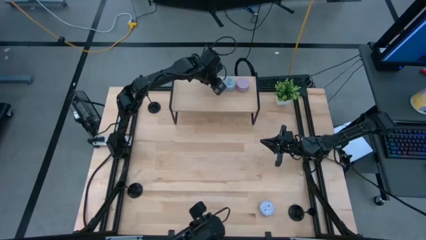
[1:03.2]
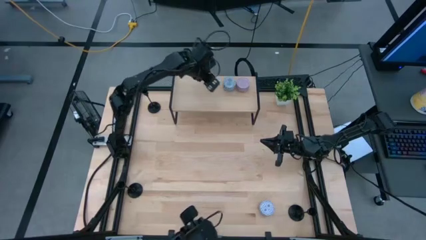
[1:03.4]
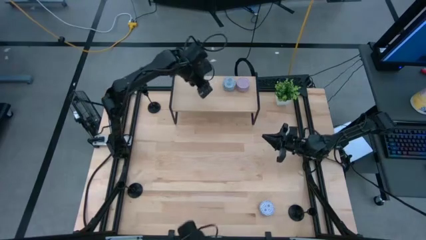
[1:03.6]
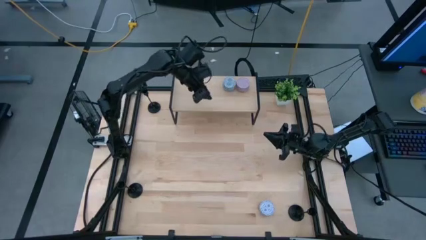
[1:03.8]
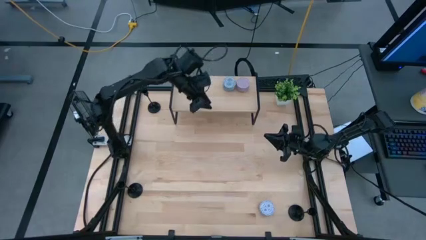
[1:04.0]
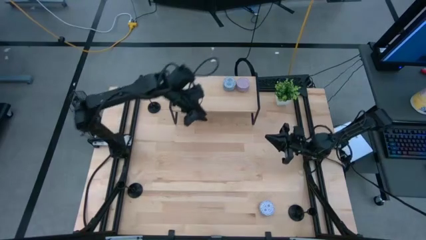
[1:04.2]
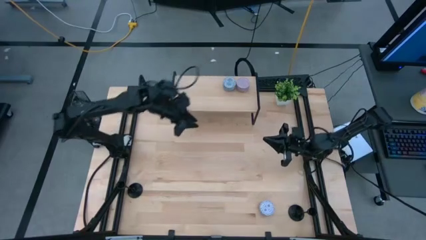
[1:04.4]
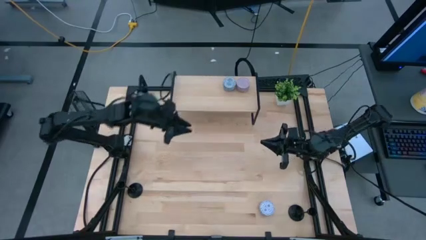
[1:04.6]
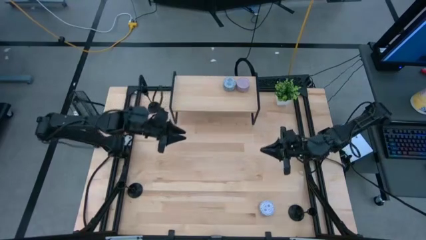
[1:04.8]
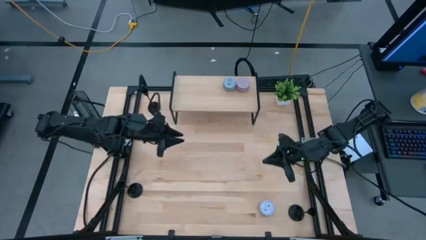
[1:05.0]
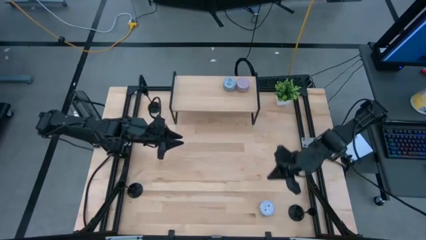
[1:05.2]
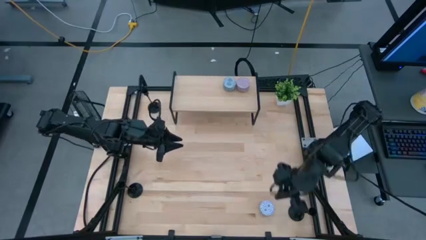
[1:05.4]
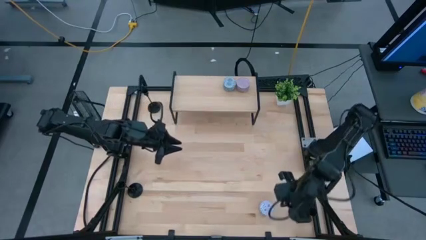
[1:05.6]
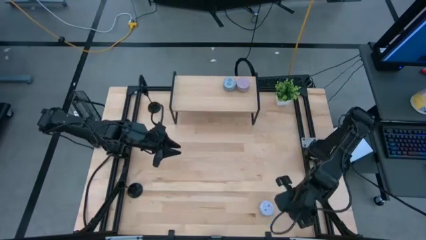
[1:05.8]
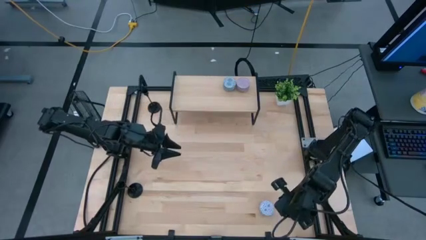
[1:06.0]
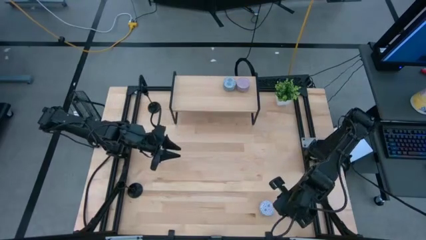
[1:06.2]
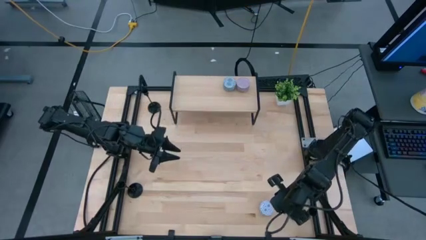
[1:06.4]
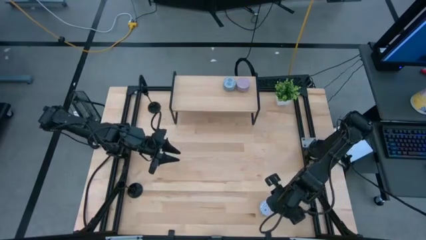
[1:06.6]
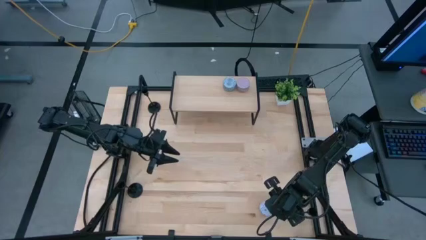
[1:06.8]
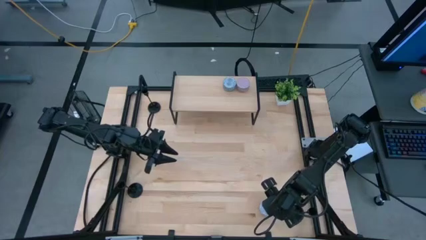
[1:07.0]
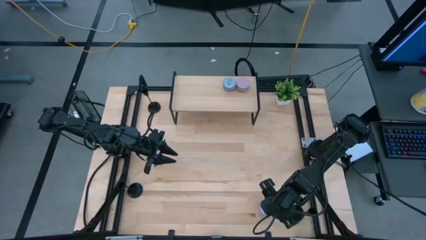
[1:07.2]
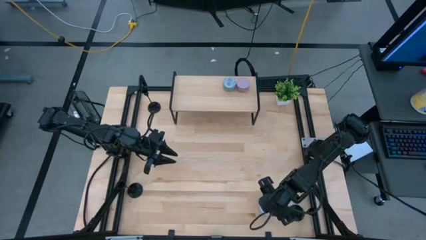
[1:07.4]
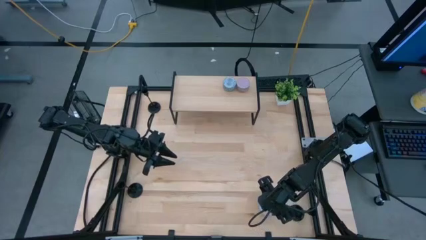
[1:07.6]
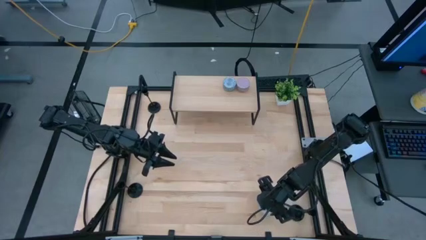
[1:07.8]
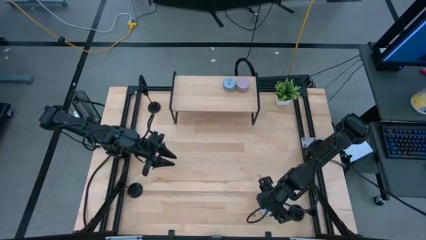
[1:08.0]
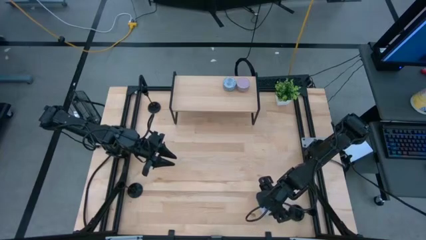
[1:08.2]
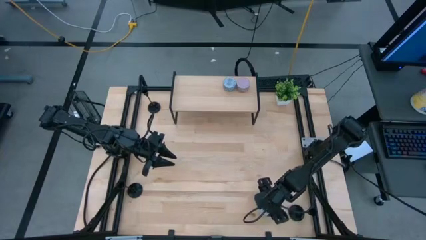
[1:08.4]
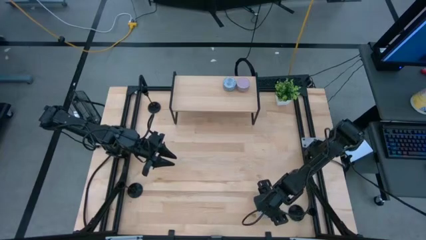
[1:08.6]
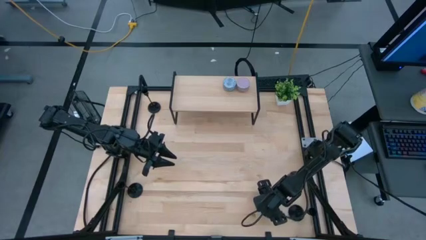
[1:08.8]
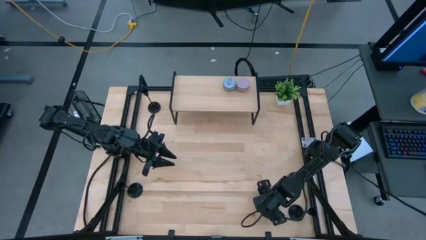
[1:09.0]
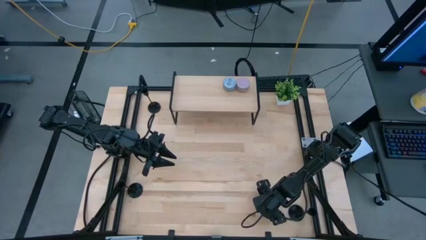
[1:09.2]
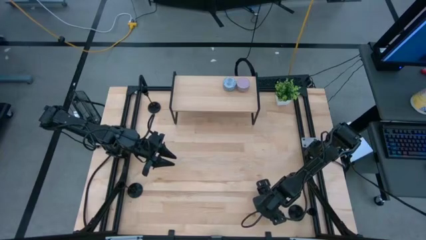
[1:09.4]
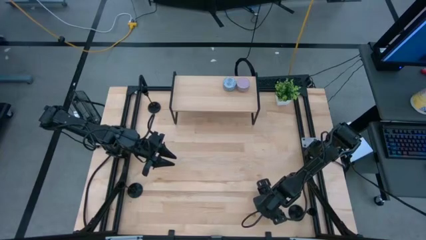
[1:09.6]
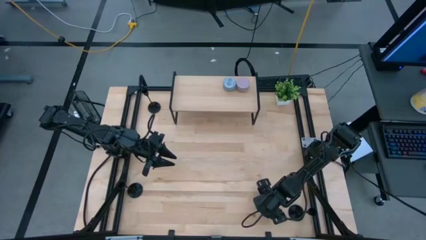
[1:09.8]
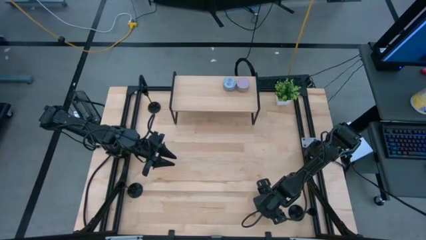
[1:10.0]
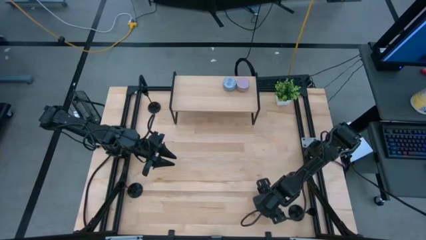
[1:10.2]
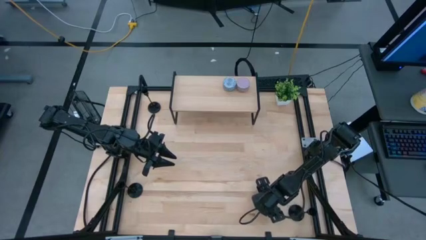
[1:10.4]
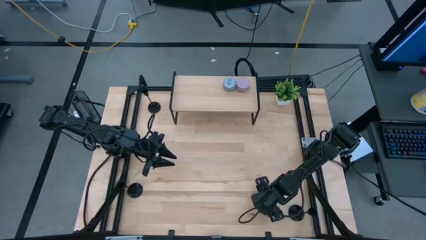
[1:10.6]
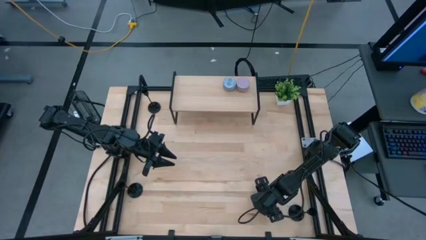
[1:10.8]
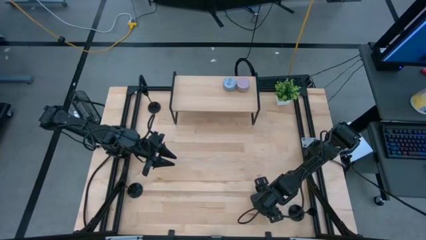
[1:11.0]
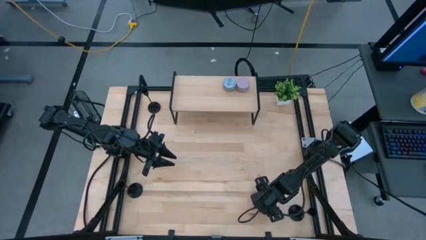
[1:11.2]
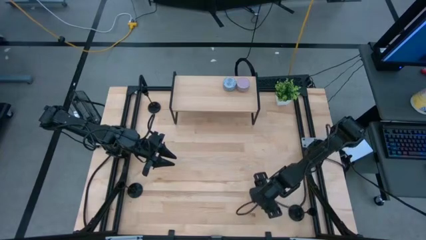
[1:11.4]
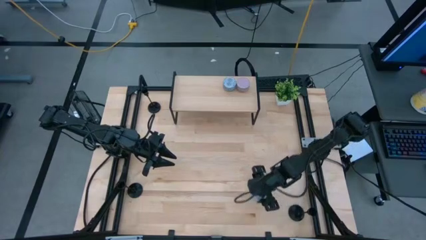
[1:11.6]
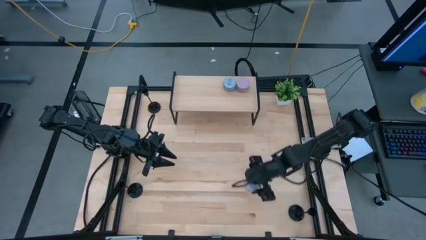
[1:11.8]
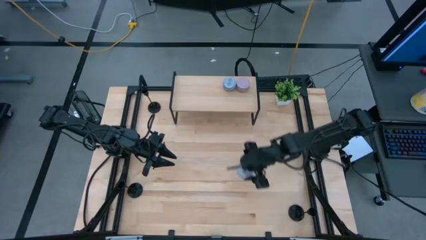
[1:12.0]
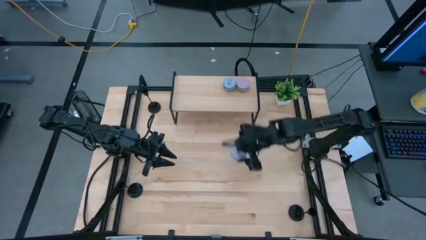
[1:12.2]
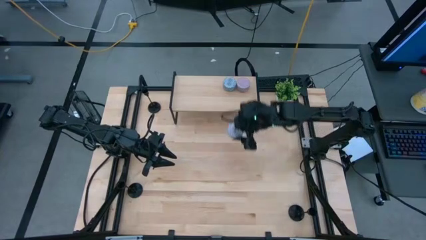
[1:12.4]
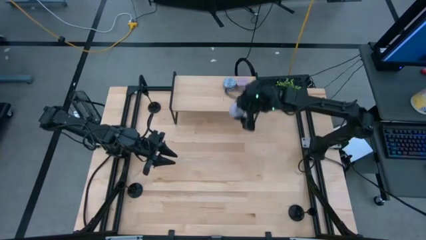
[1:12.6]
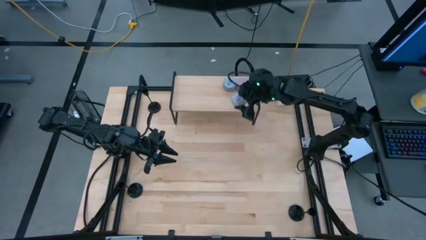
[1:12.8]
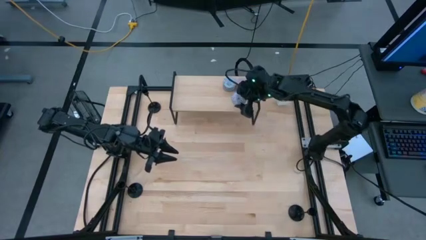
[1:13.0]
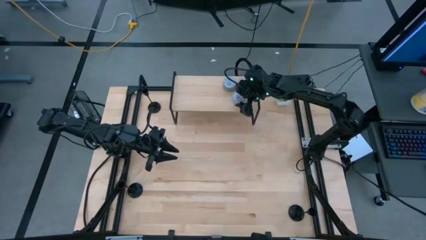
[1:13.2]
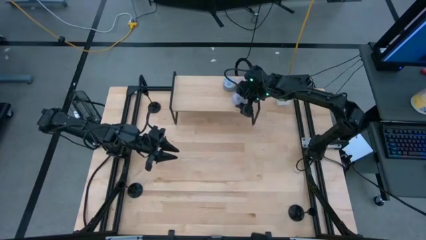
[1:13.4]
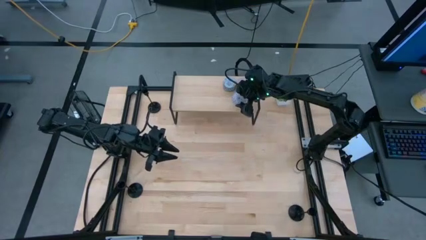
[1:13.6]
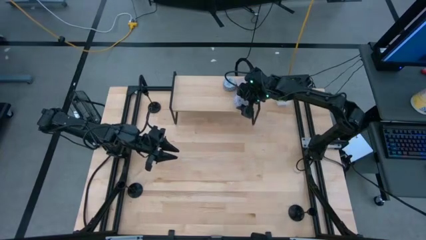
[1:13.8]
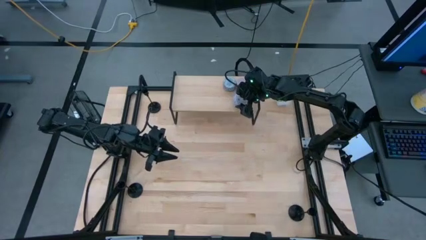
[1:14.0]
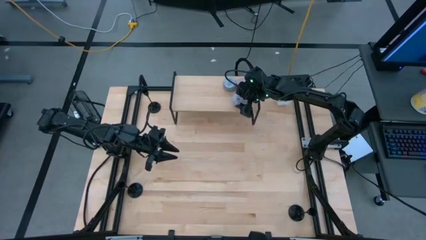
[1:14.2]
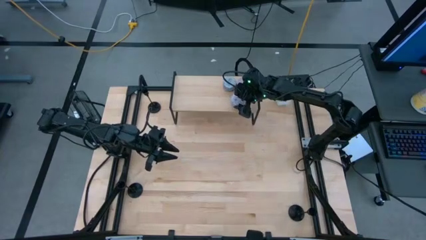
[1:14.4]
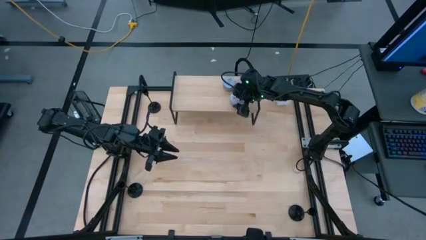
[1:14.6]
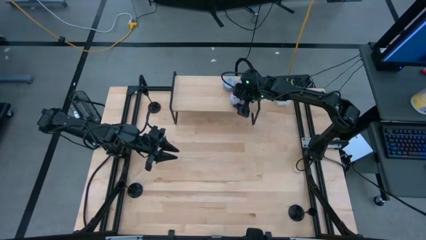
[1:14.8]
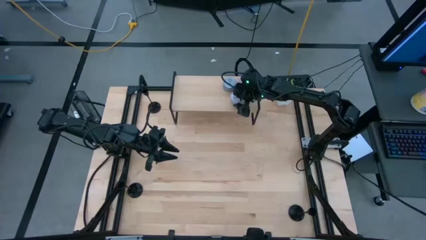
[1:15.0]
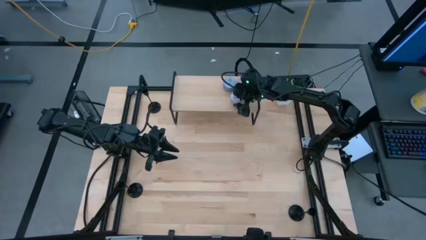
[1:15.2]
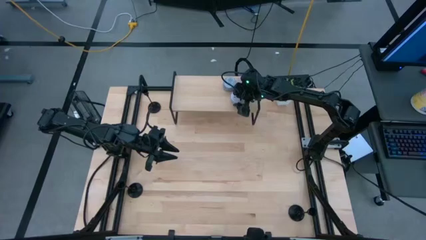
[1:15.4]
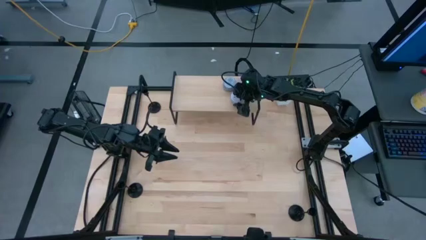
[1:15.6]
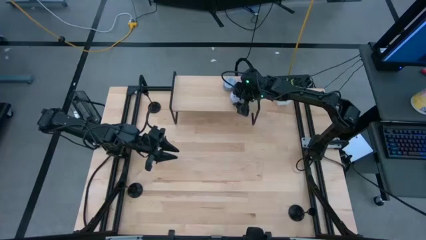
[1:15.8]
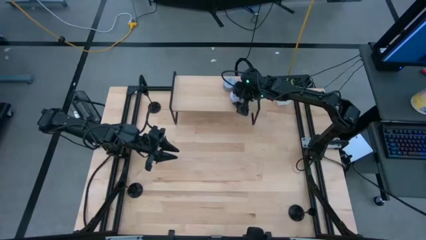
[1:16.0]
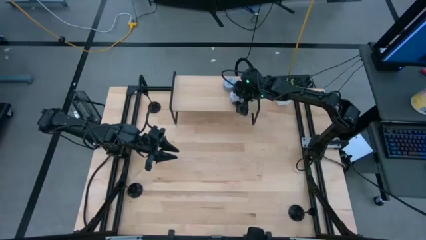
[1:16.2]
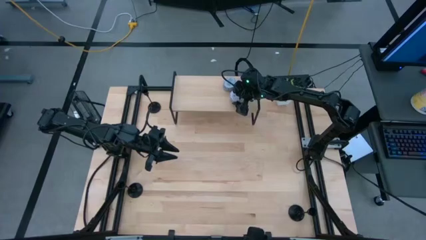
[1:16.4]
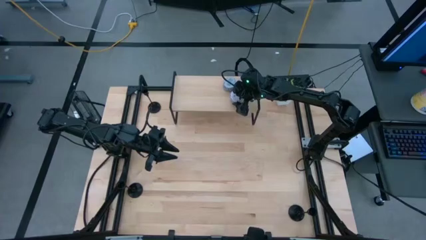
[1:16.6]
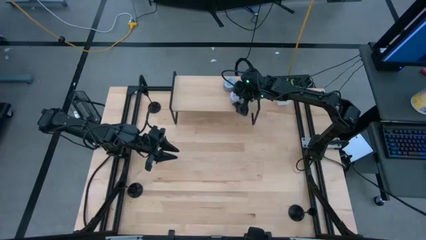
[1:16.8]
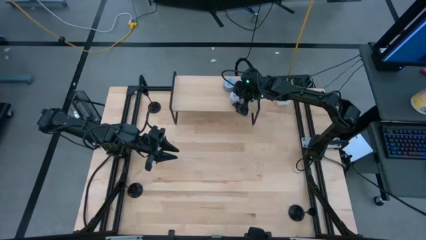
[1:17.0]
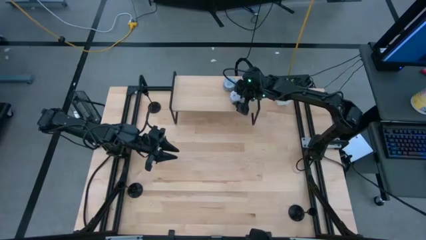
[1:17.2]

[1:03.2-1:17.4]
Task: Pick & Place candle stick holders
Put the red scented candle on the shelf
